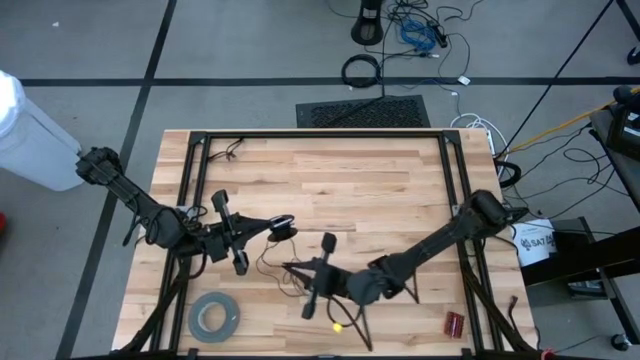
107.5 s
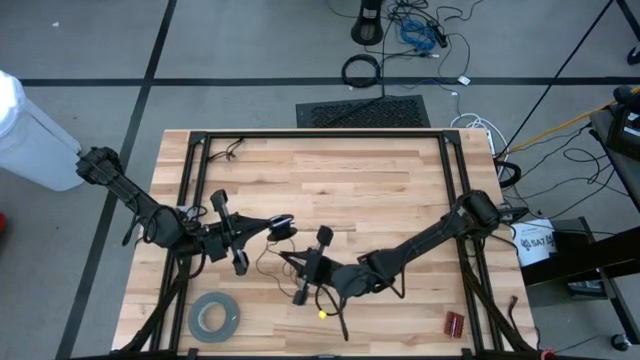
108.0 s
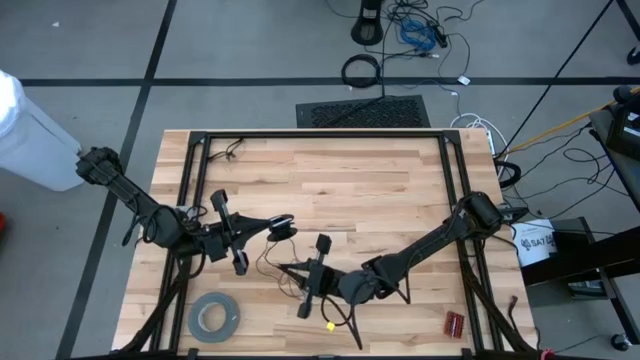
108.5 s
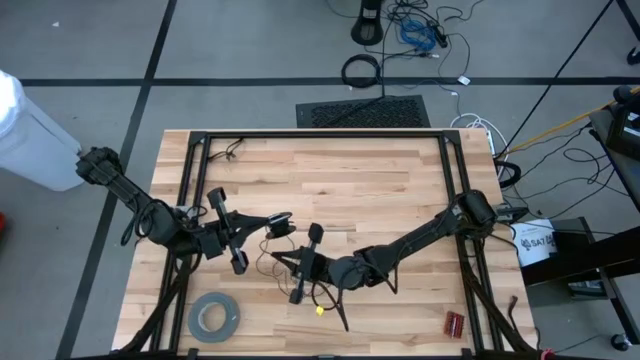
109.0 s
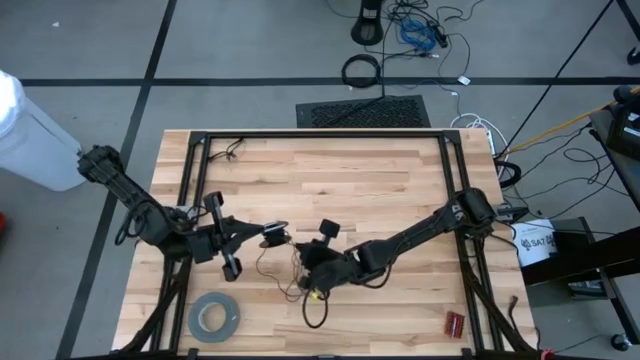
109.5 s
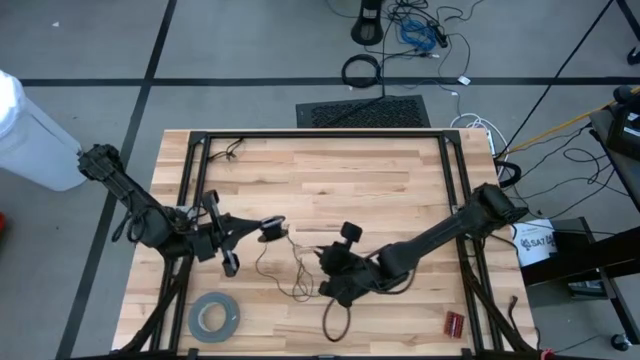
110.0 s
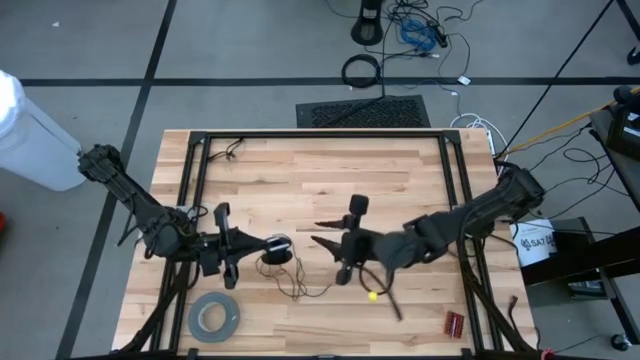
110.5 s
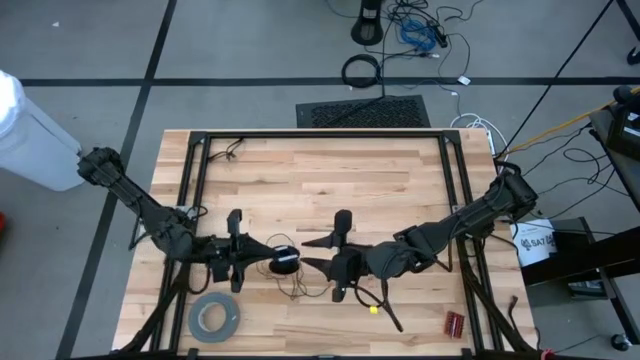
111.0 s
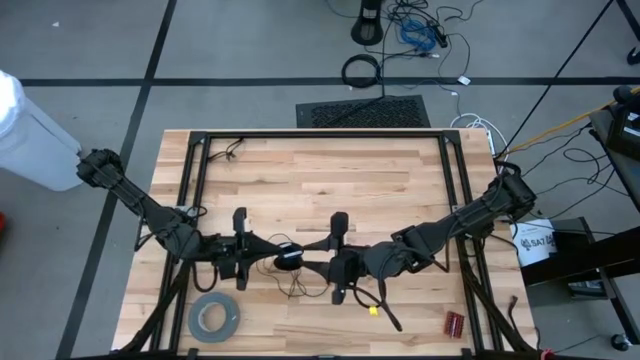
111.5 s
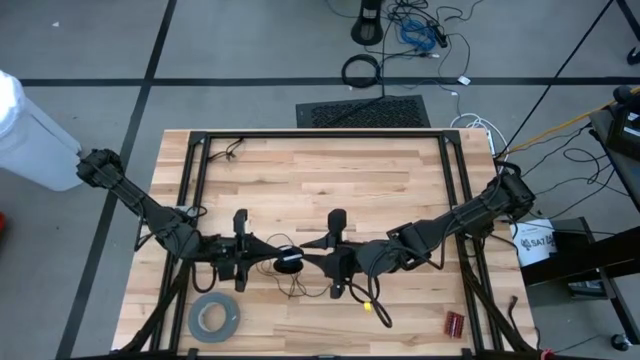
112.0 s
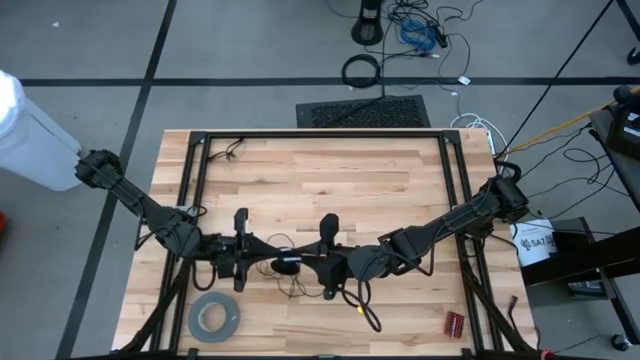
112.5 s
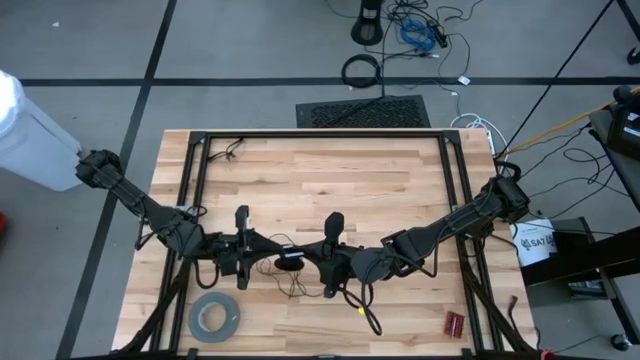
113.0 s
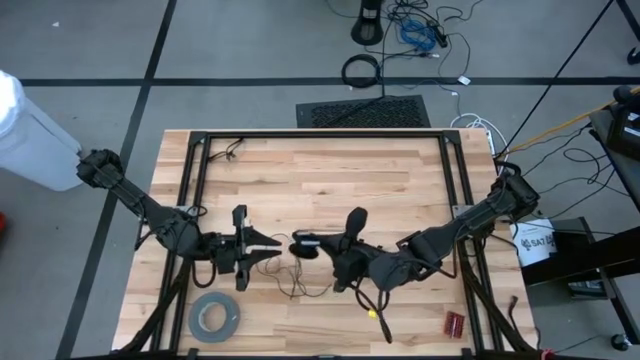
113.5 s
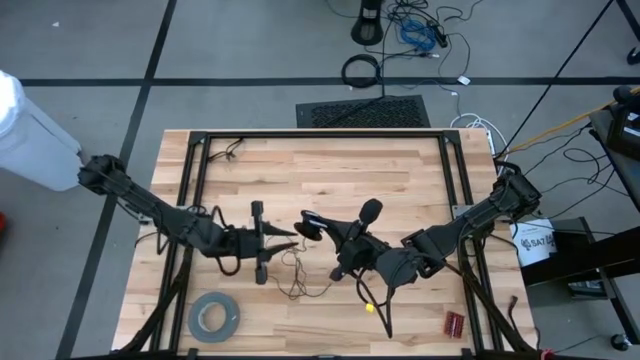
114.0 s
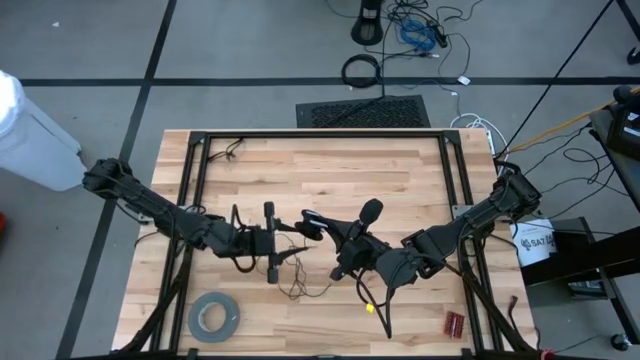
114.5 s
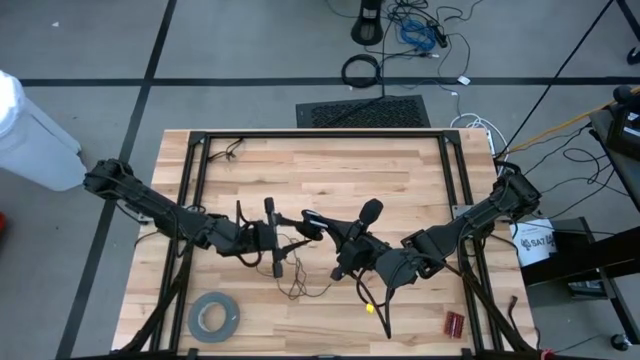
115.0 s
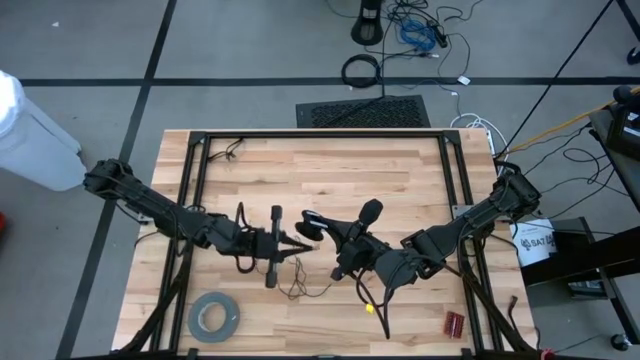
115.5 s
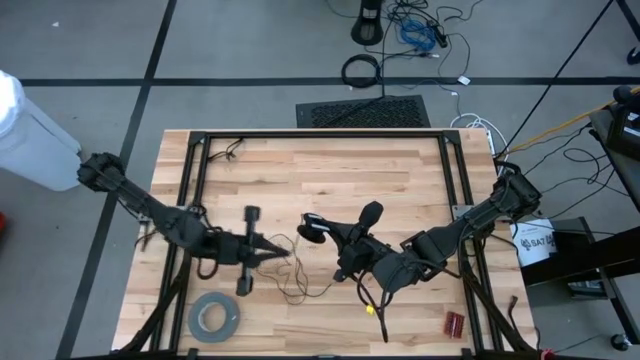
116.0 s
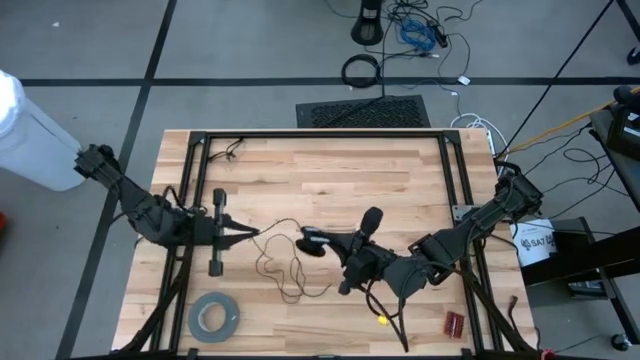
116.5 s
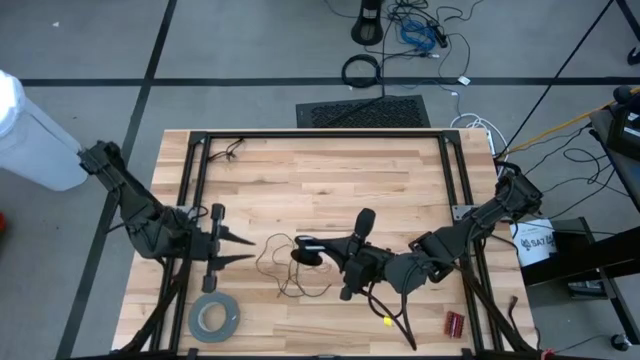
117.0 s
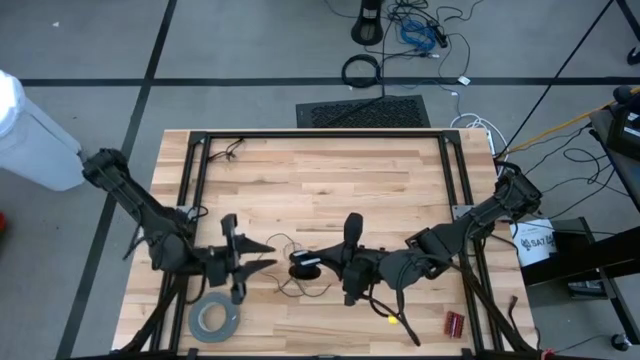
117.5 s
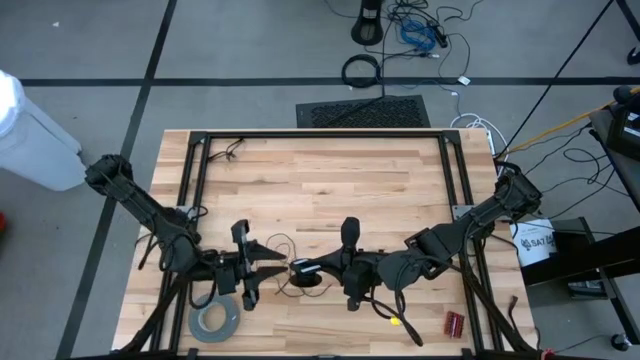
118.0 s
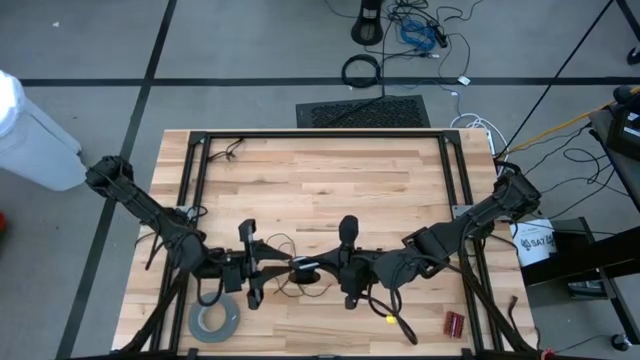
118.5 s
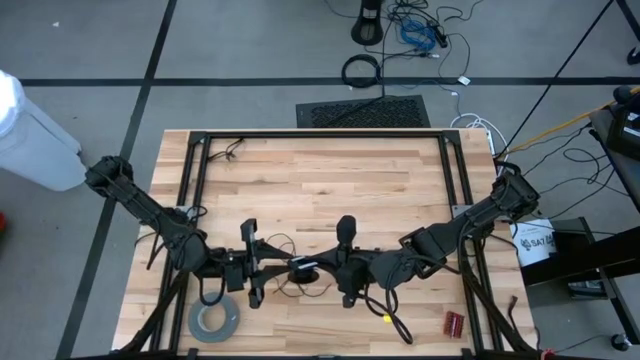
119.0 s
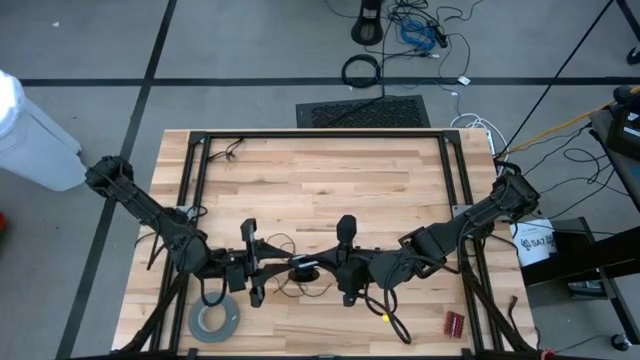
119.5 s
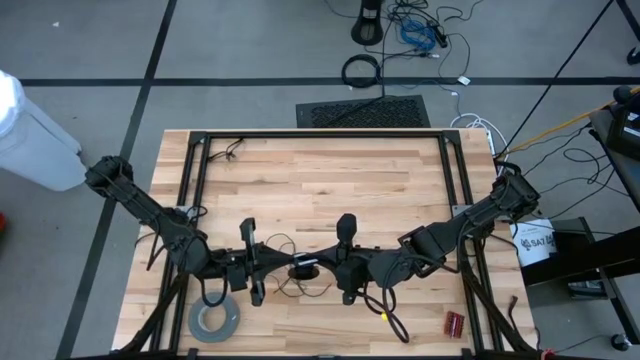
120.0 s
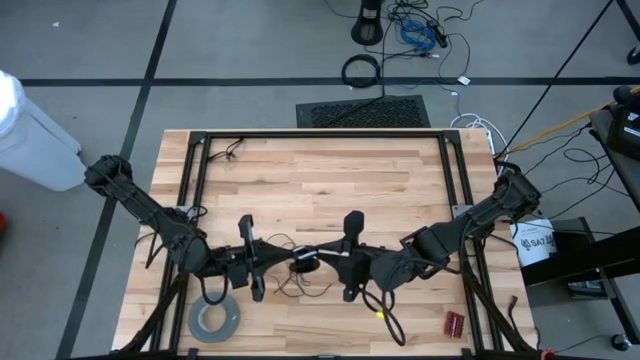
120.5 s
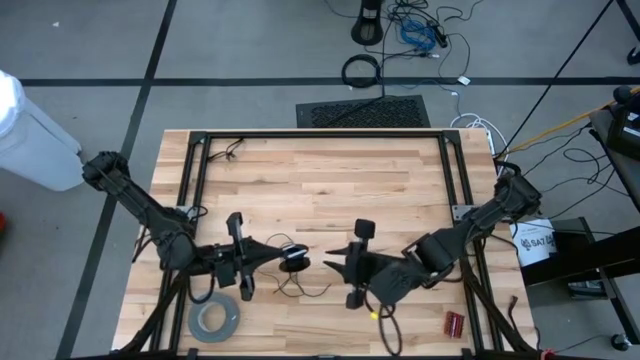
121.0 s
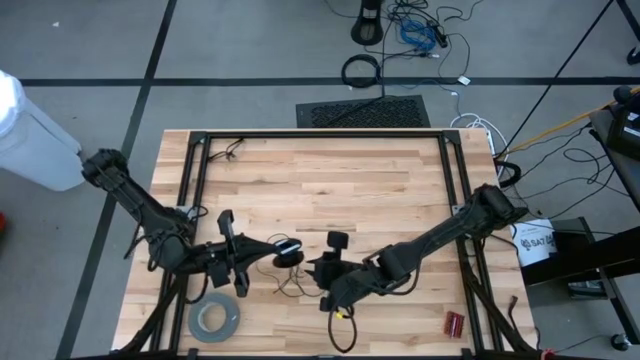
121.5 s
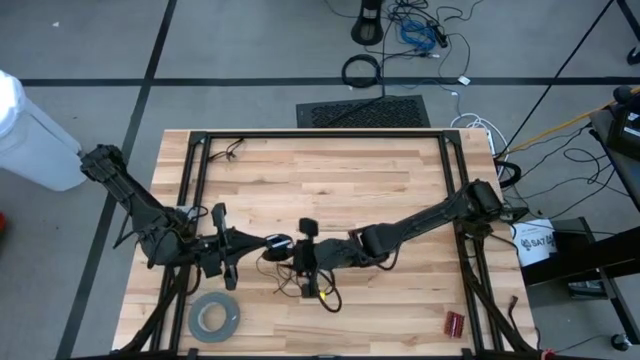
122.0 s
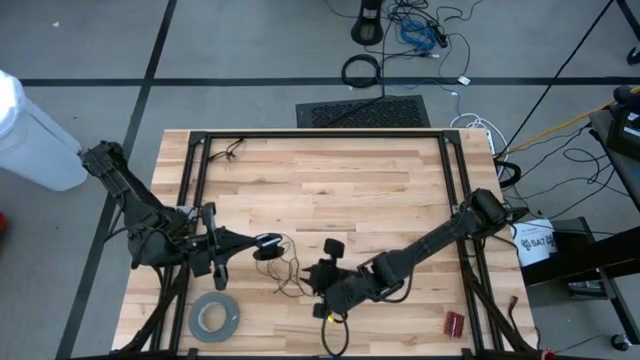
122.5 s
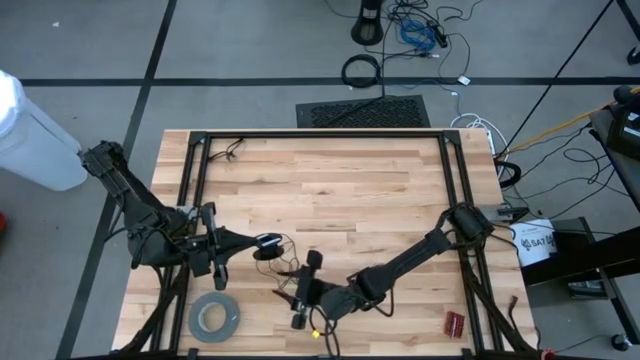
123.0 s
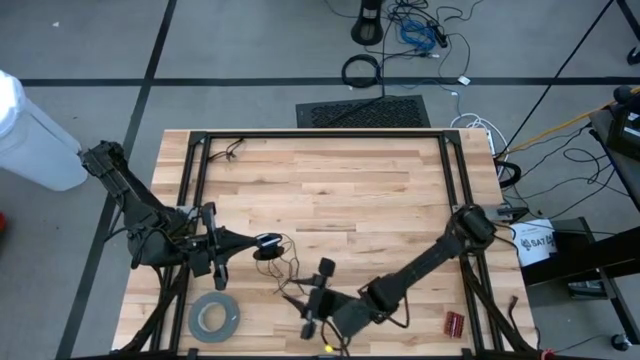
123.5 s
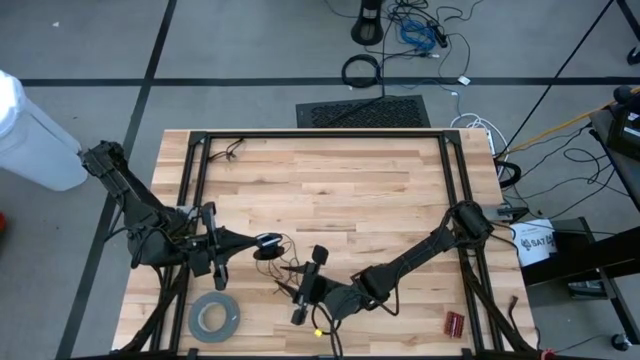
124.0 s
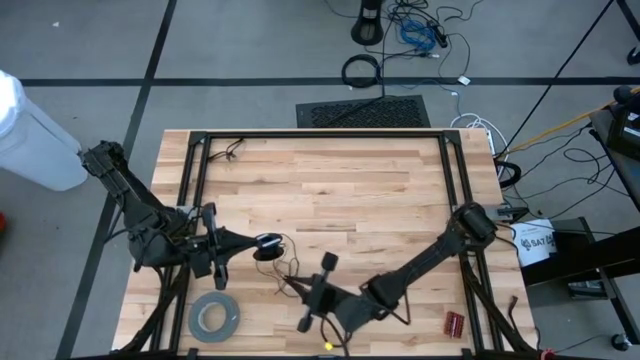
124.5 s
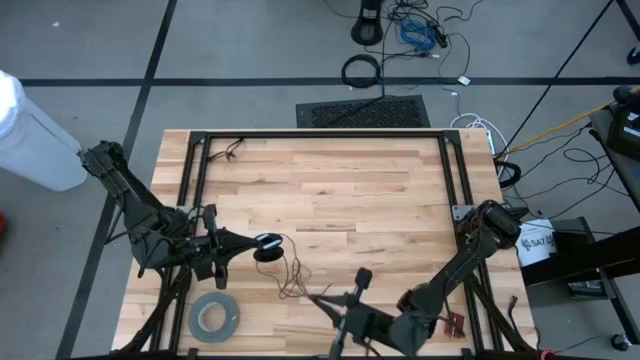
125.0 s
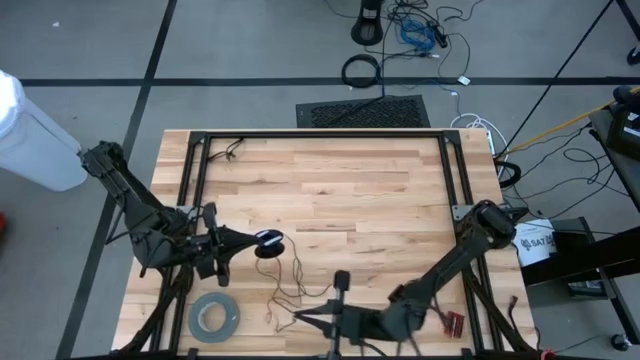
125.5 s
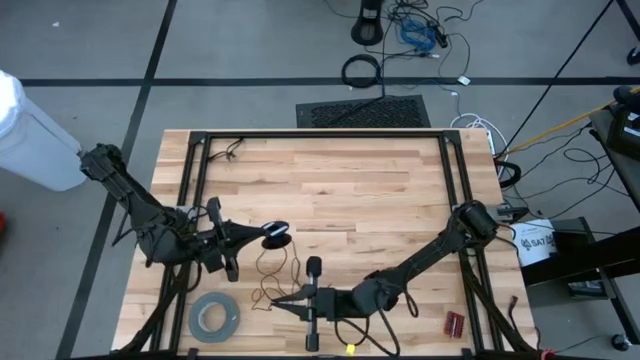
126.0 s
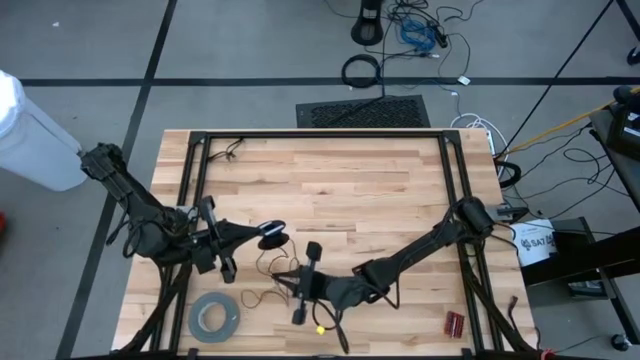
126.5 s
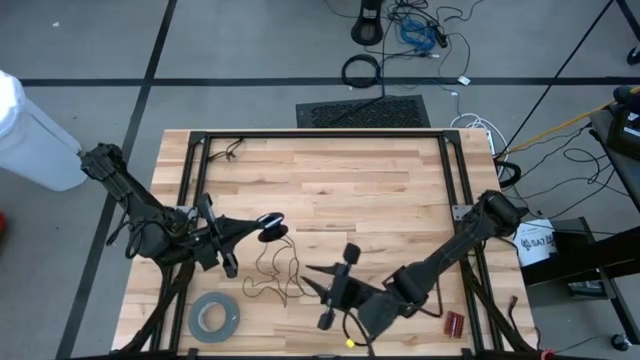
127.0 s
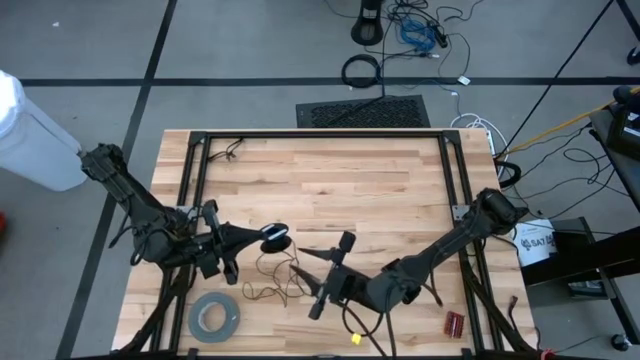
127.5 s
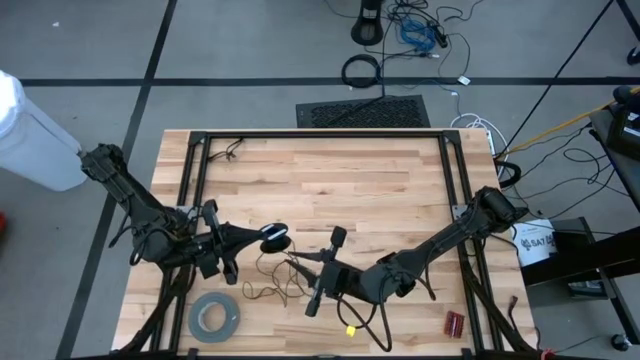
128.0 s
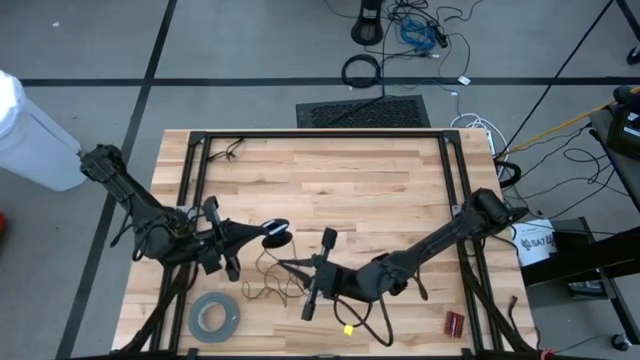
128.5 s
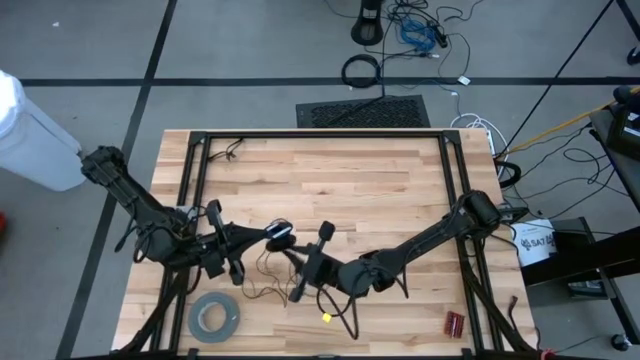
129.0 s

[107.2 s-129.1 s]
Task: Coil cords
Uncoil the black wire from the spool
